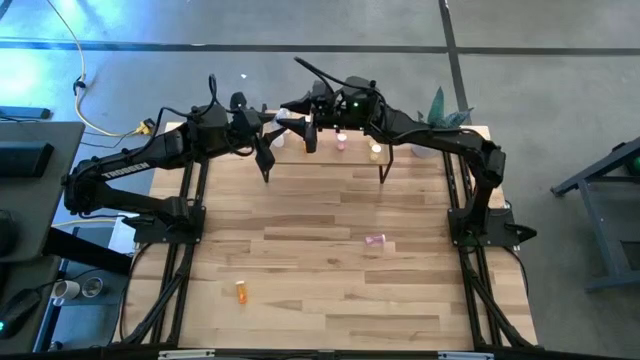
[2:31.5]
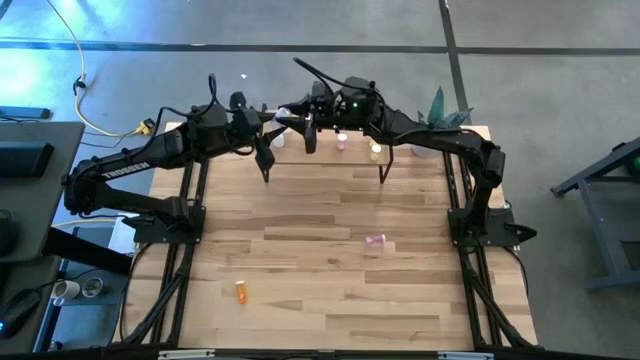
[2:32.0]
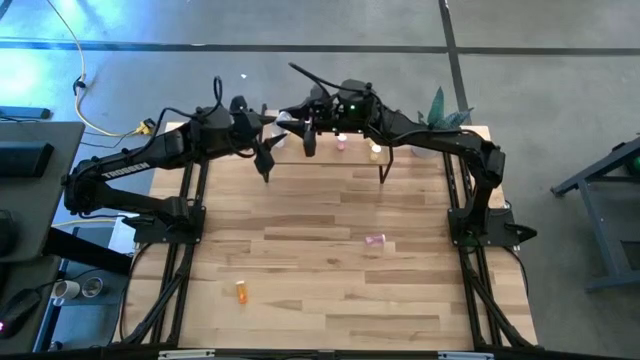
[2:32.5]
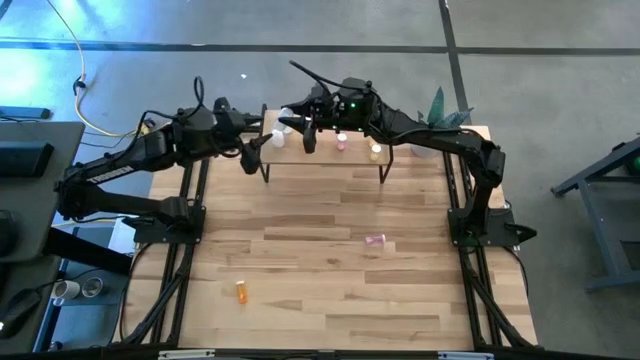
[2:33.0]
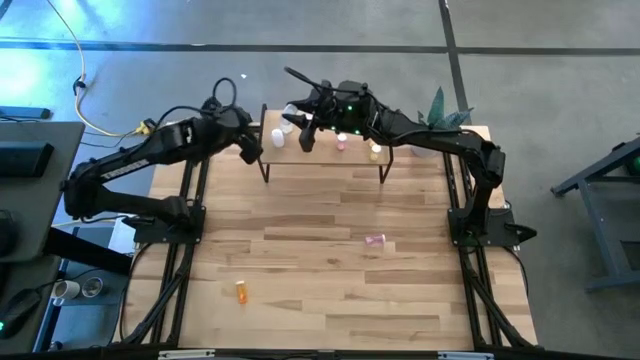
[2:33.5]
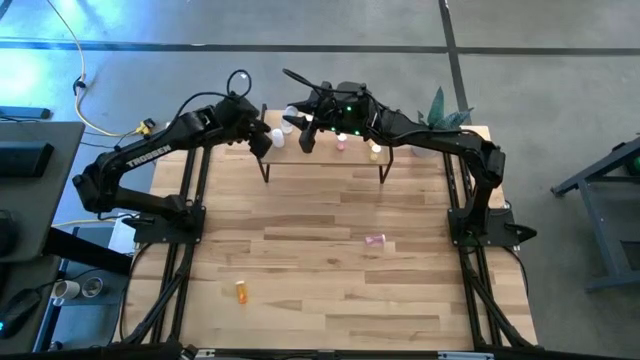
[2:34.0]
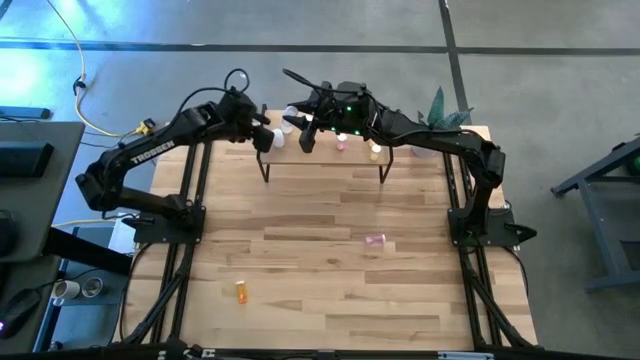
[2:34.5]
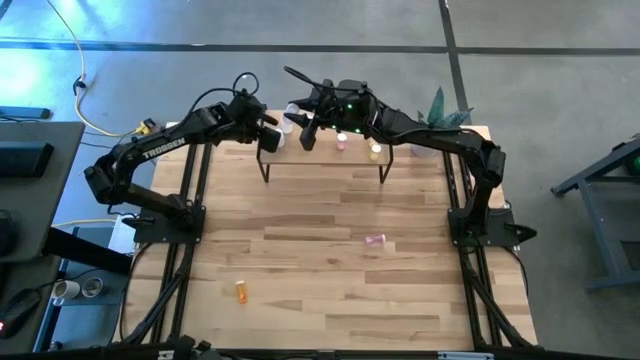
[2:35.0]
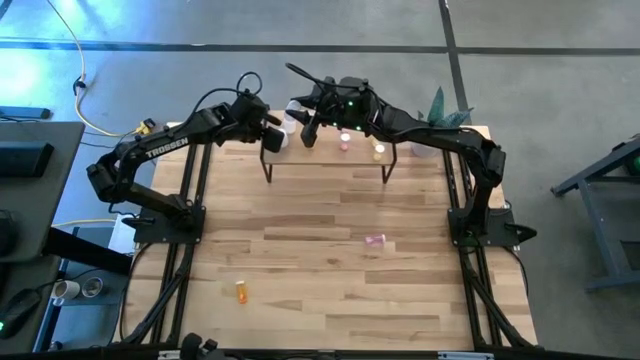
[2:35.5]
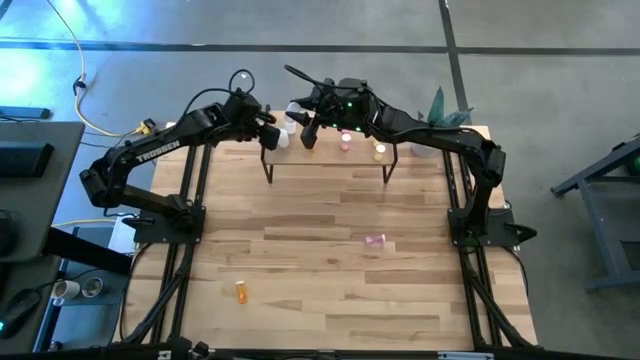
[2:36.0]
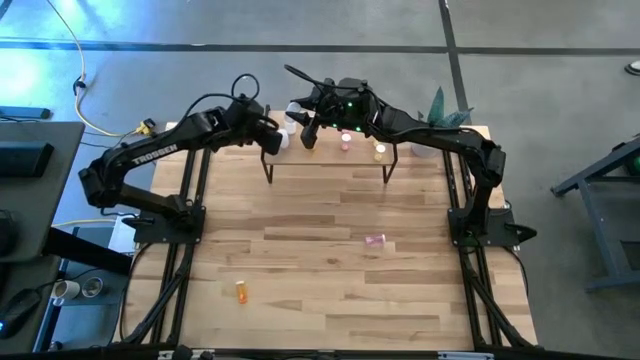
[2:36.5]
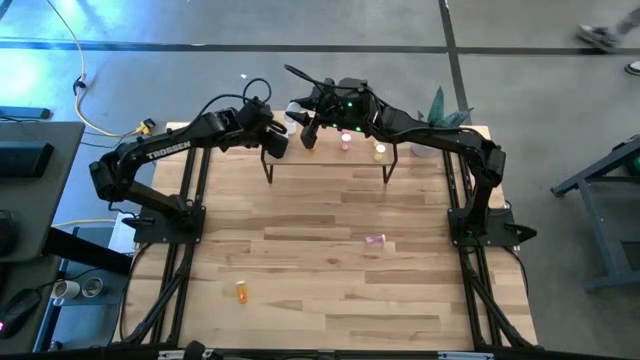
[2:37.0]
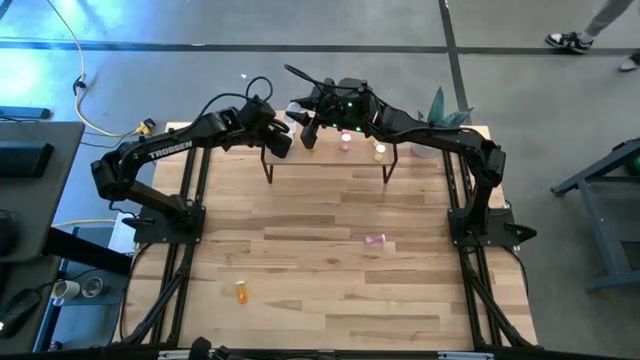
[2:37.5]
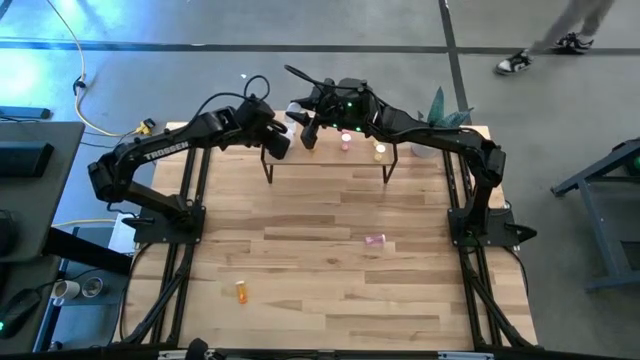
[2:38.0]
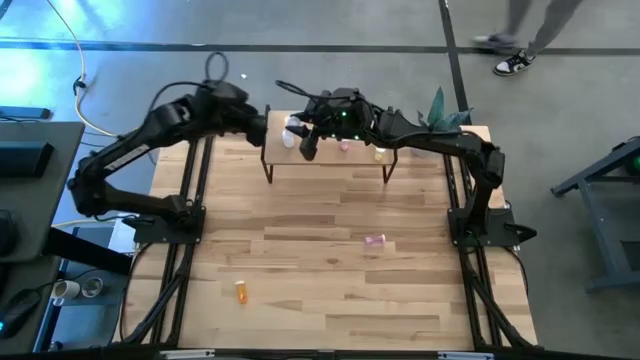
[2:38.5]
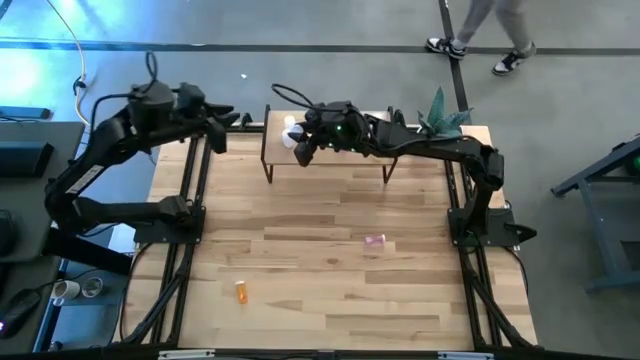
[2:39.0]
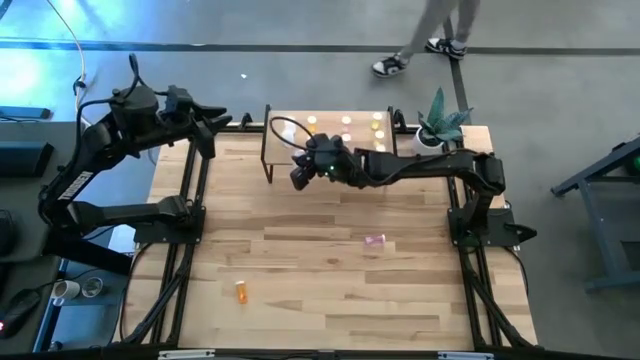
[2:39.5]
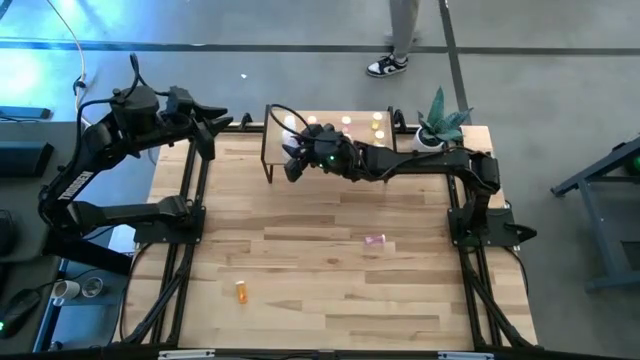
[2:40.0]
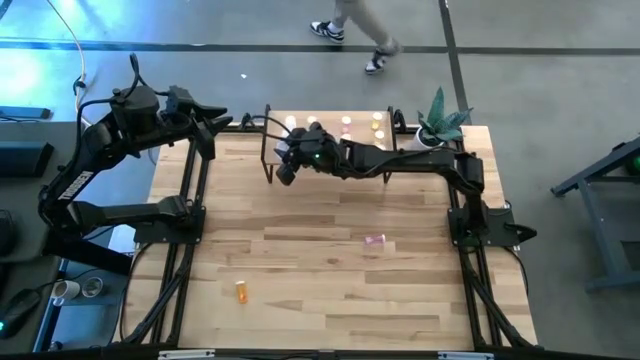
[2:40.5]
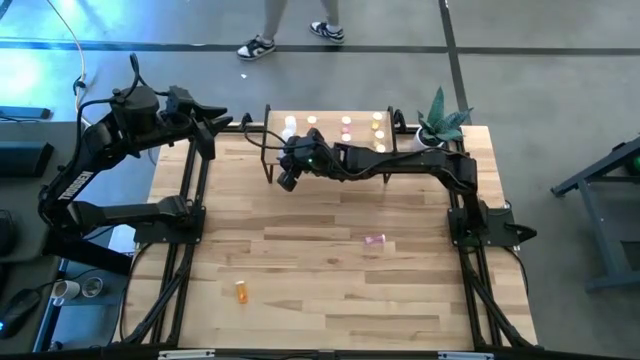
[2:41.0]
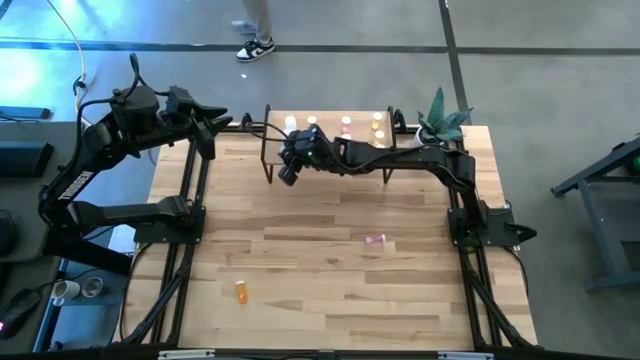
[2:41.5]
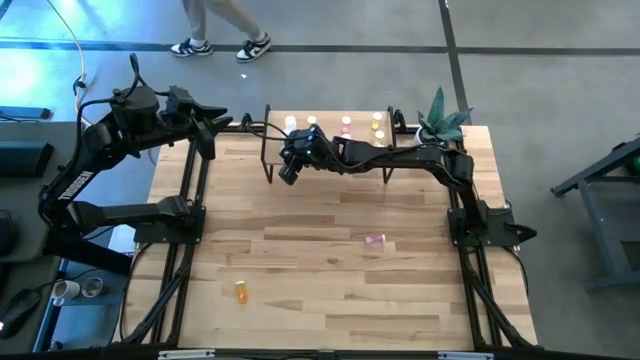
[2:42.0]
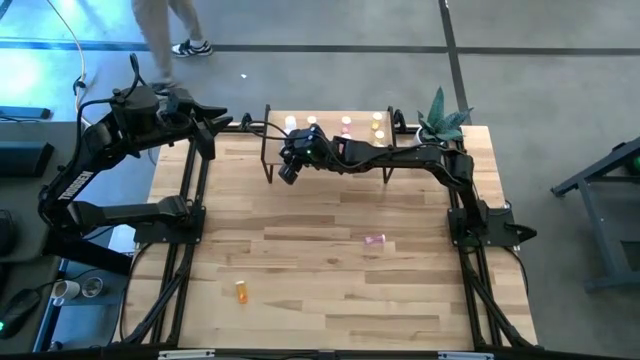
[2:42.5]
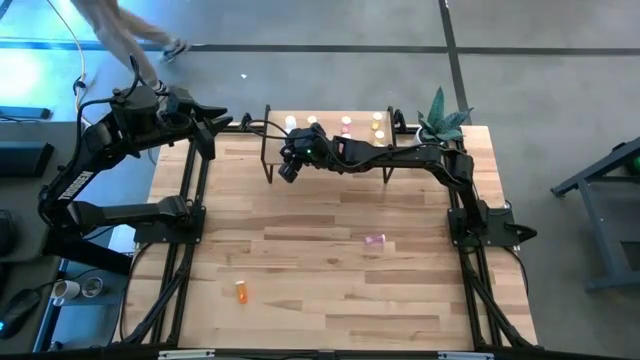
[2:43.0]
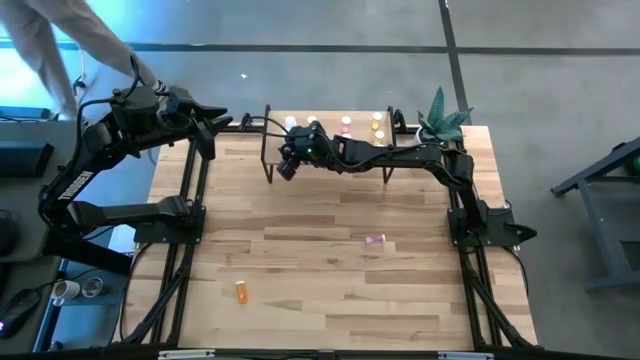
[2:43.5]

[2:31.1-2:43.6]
Task: Pick and place medicine bottles onto shelf by color
Put the transparent pill bottle aligned with the other transparent pill bottles on the shelf

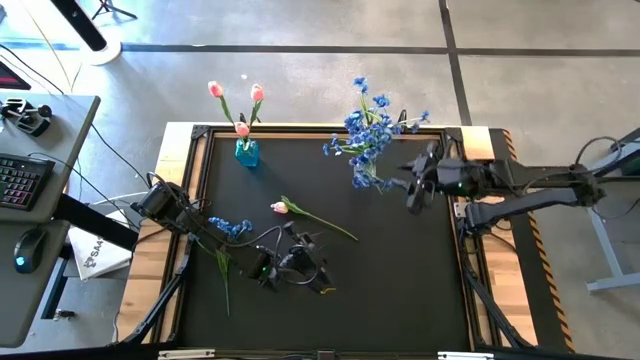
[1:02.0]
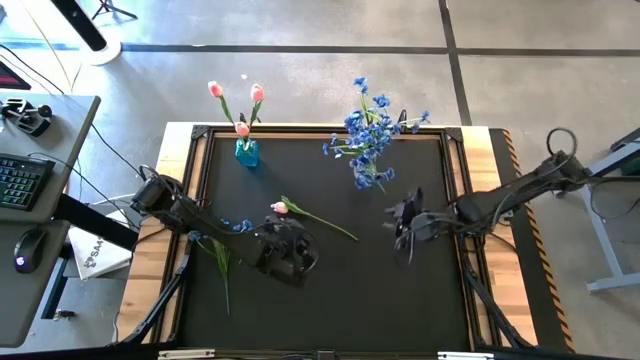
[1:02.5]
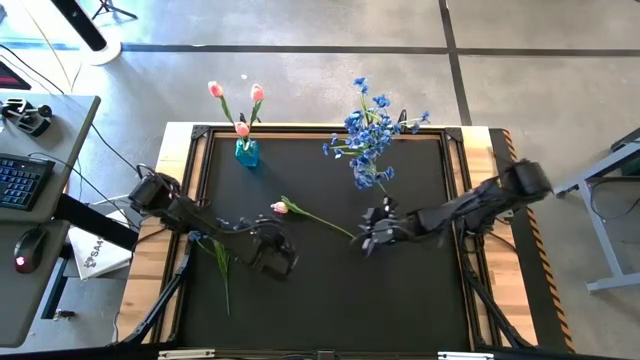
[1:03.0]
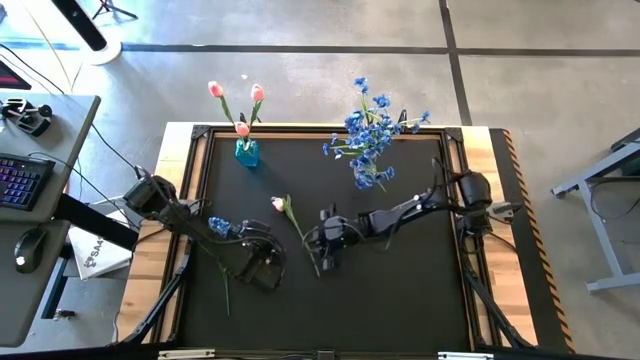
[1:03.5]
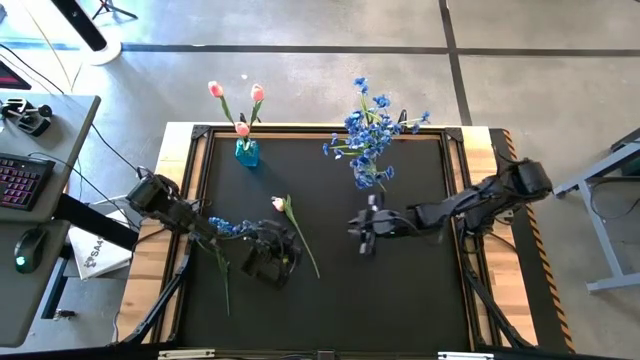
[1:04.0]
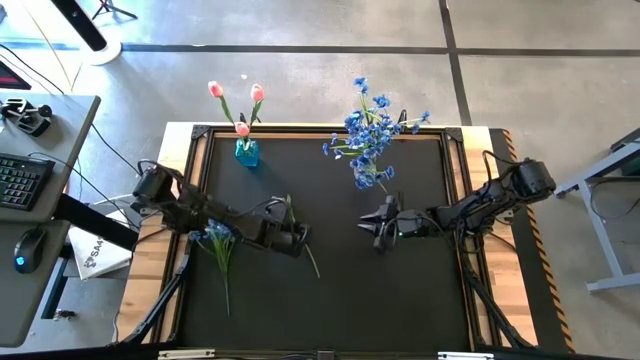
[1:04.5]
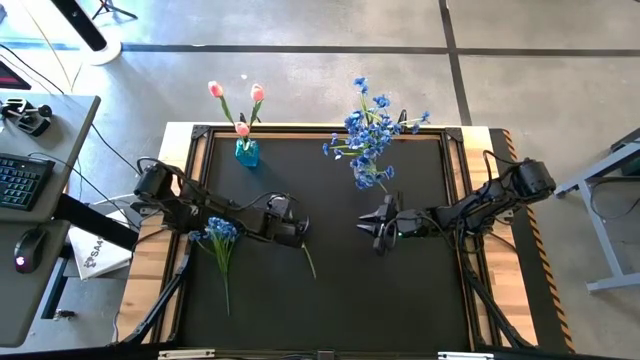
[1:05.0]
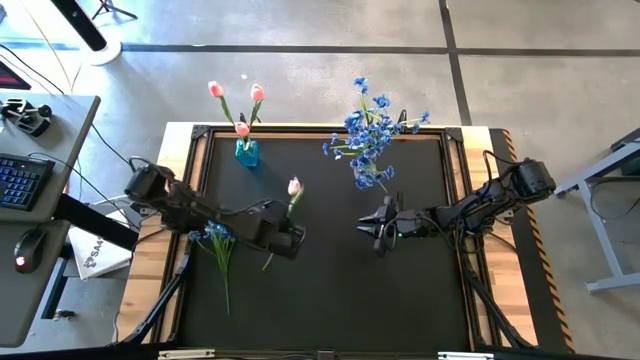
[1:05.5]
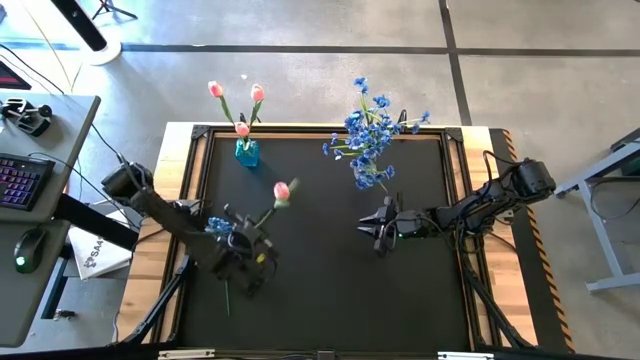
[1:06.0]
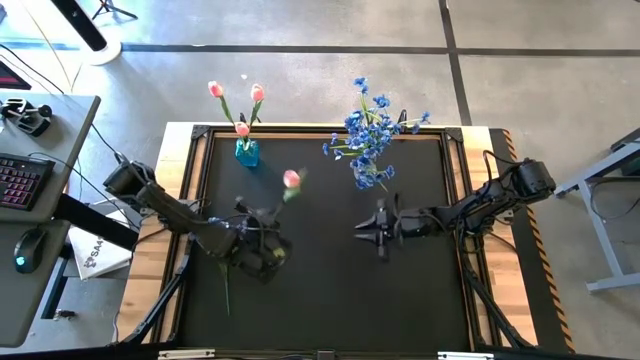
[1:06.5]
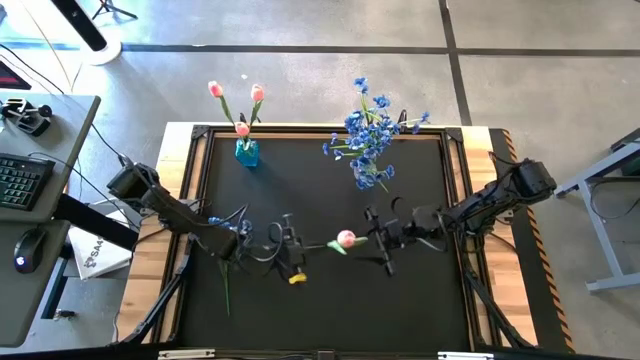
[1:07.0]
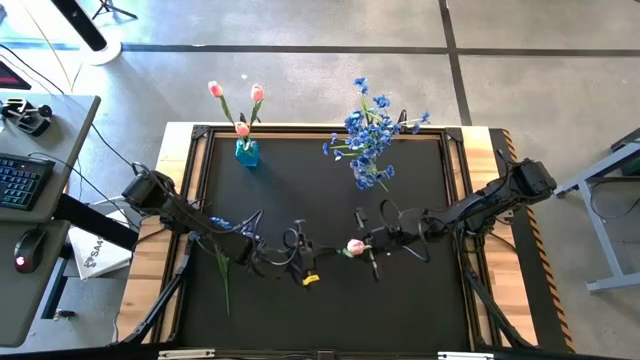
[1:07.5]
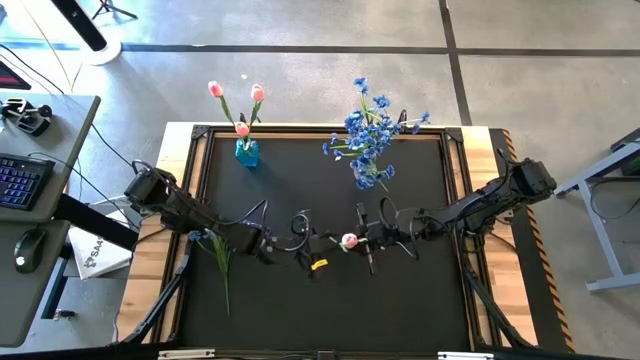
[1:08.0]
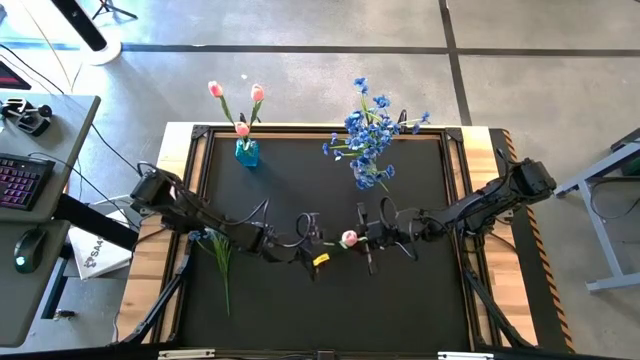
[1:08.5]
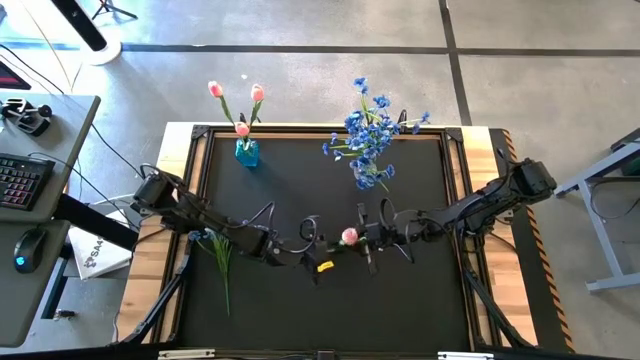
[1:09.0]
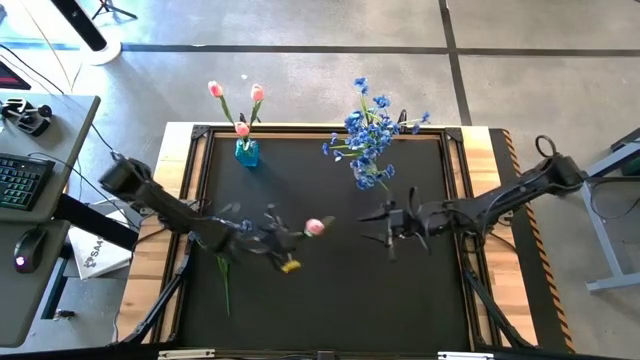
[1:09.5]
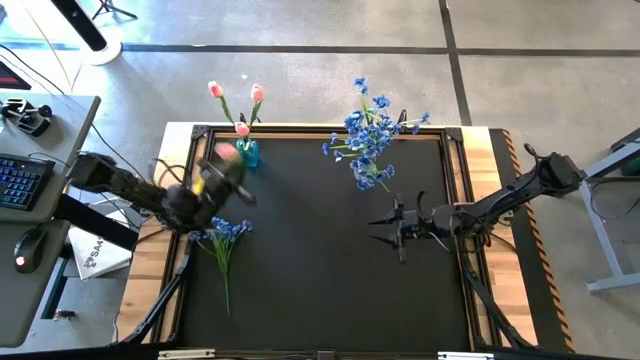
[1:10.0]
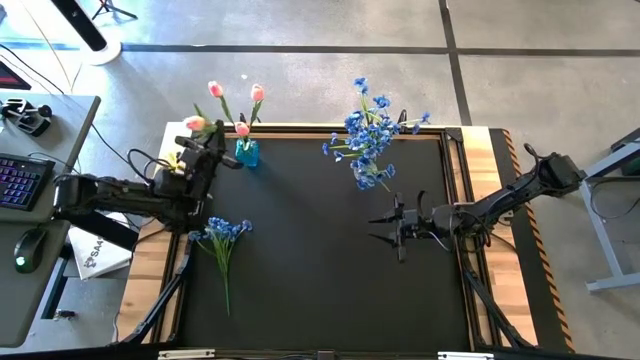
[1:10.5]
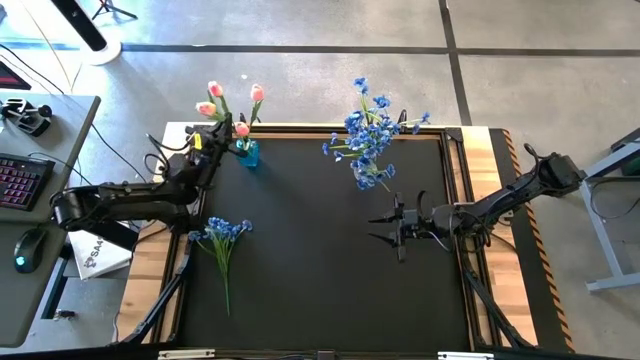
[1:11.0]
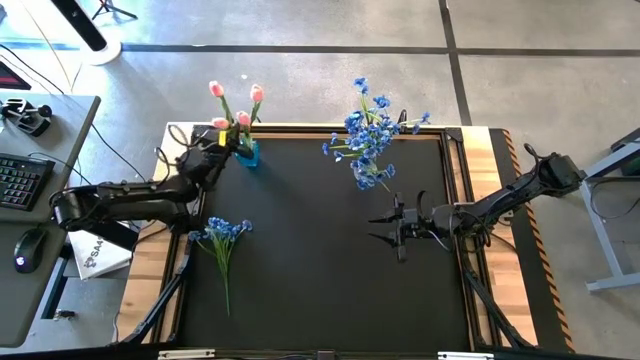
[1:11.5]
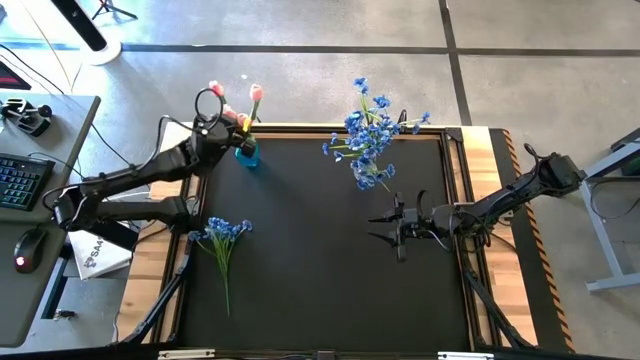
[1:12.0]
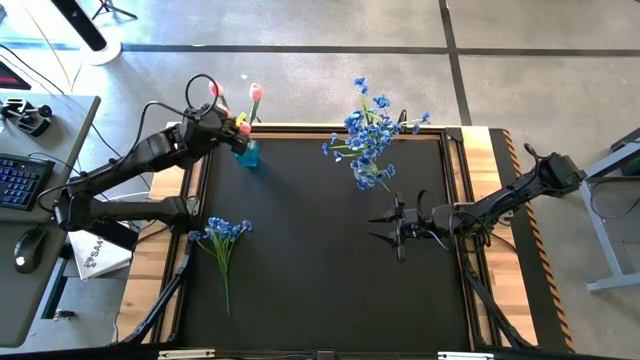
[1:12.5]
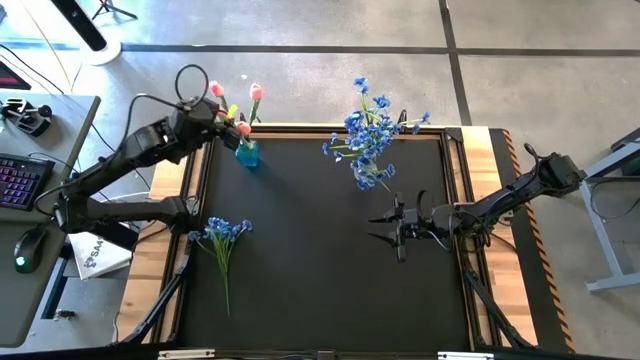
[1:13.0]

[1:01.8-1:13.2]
Task: Sort flowers into vase by color
Put the pink tulip flower into the blue flower vase
